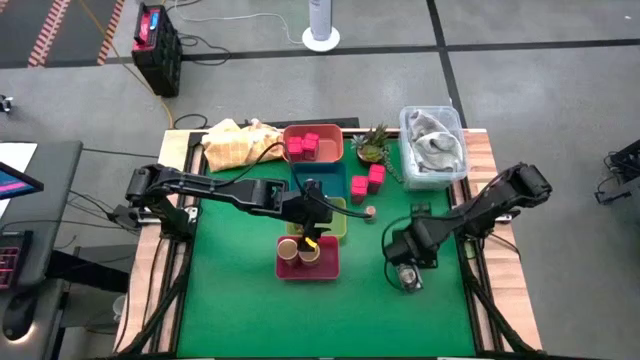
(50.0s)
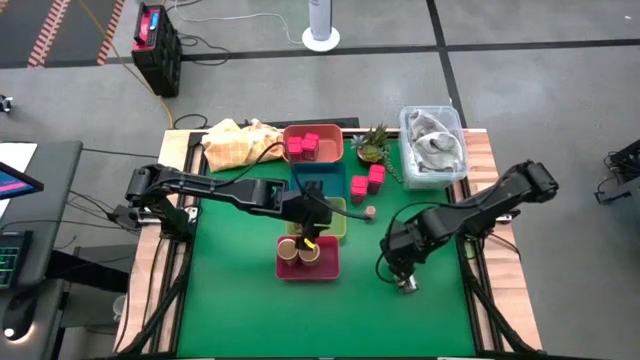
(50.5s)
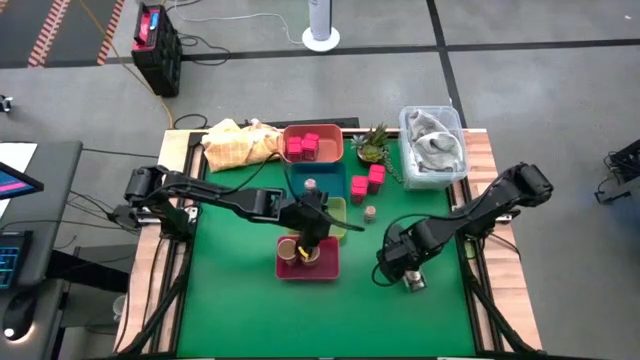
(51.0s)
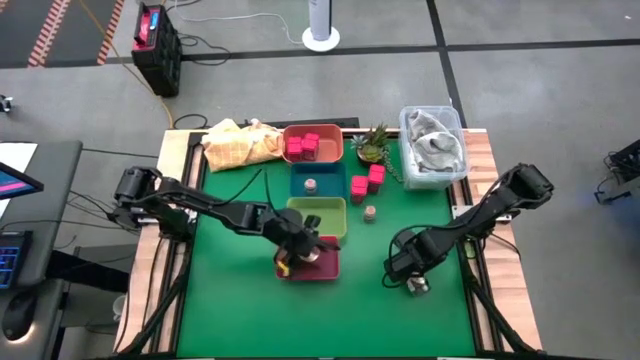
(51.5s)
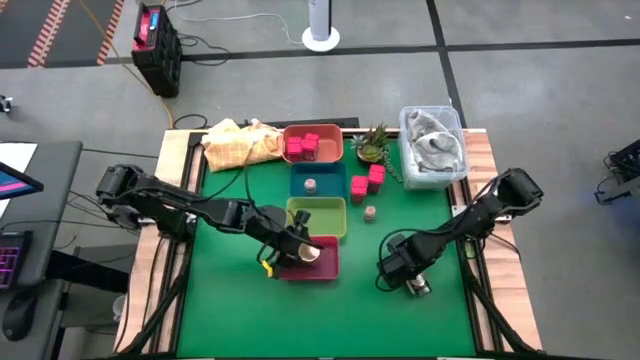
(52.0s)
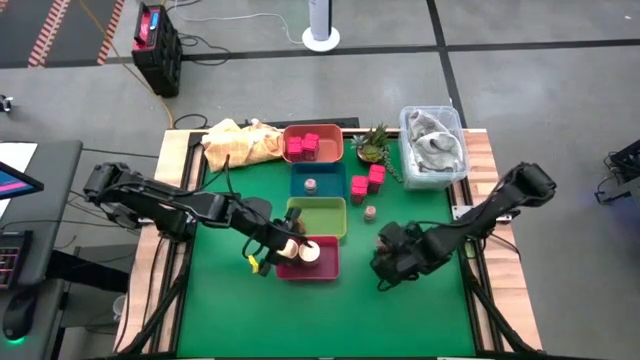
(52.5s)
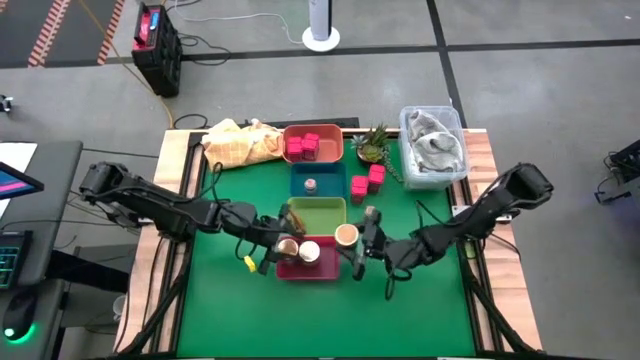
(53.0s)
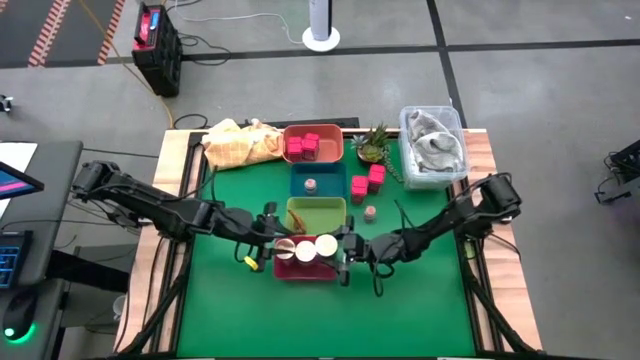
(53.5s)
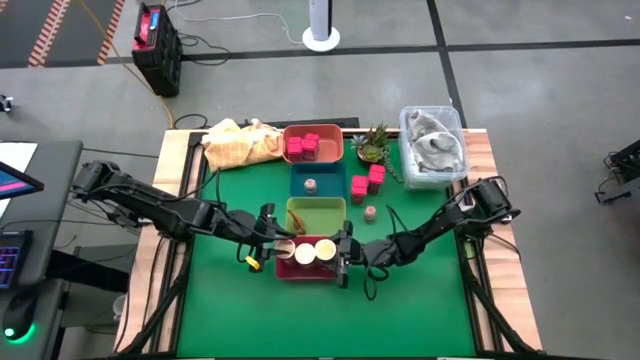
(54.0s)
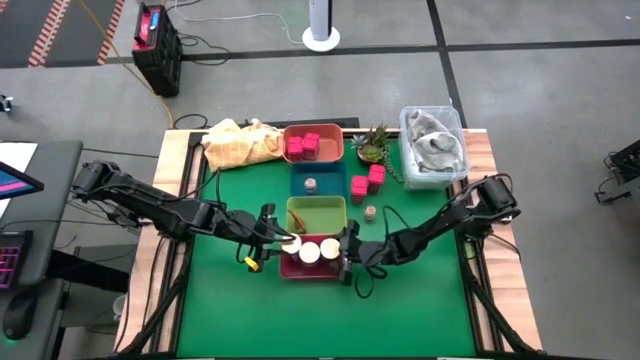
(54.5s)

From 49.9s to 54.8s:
Task: Sort spices by type
Put the gold seasoning bottle into the red bin

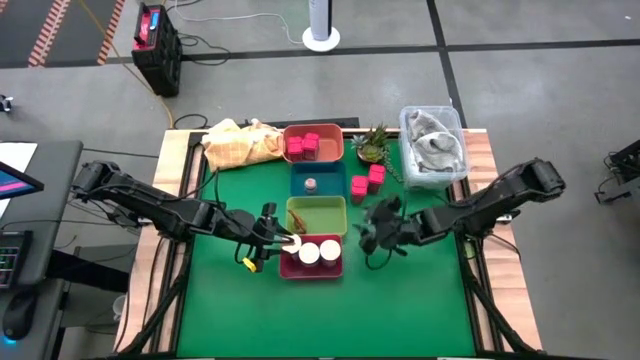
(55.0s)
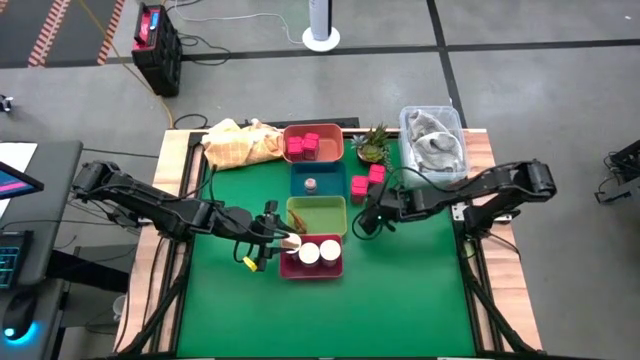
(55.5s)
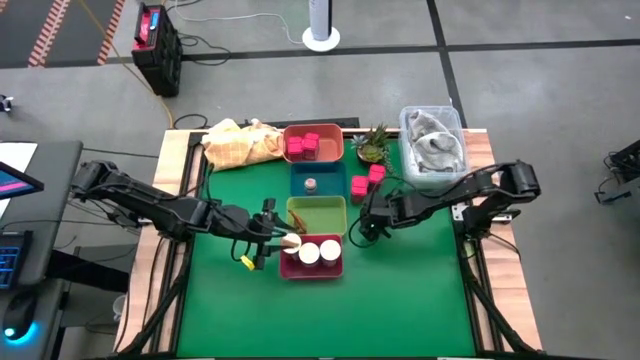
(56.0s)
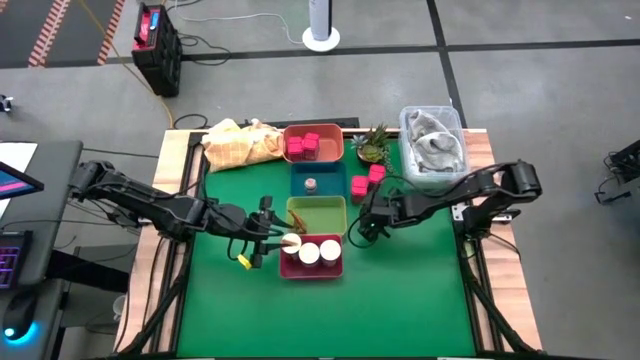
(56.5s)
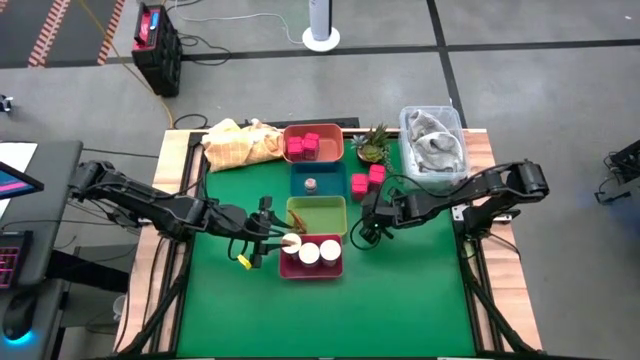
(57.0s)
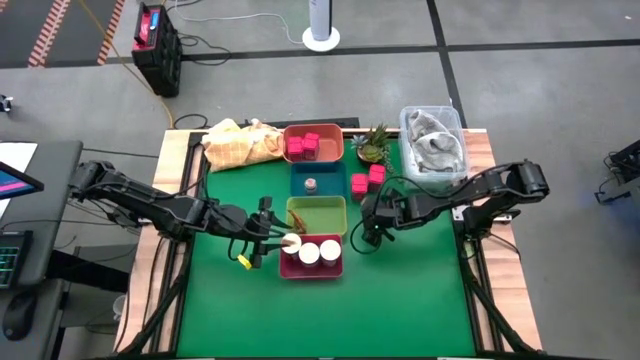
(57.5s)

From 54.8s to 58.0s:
Put the brown seasoning bottle into the blue bin

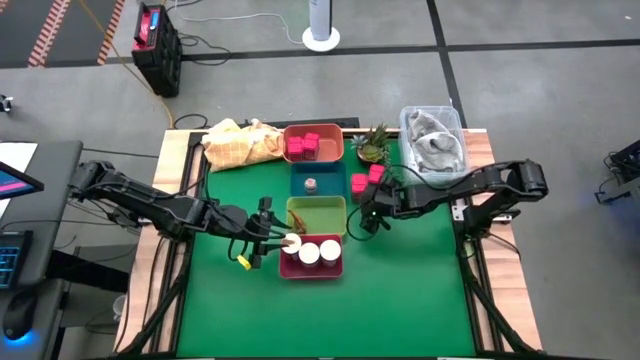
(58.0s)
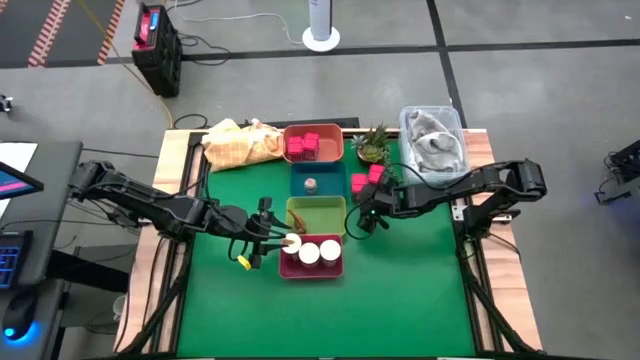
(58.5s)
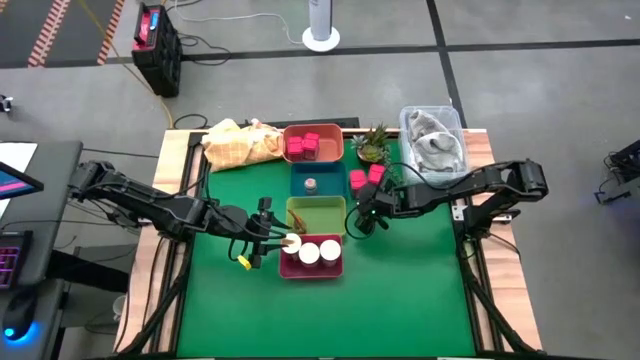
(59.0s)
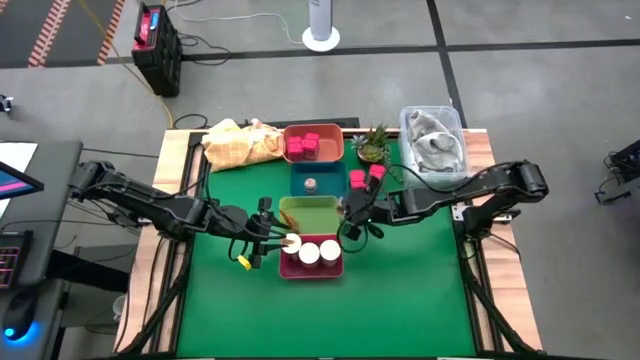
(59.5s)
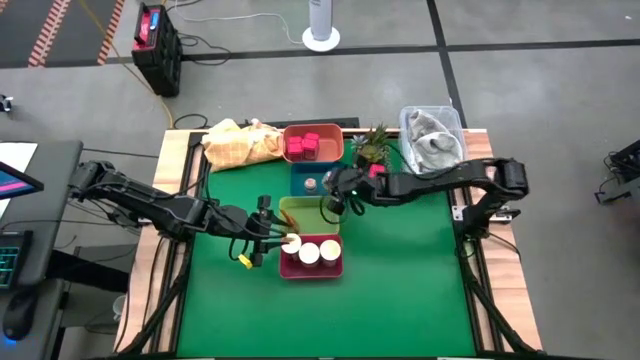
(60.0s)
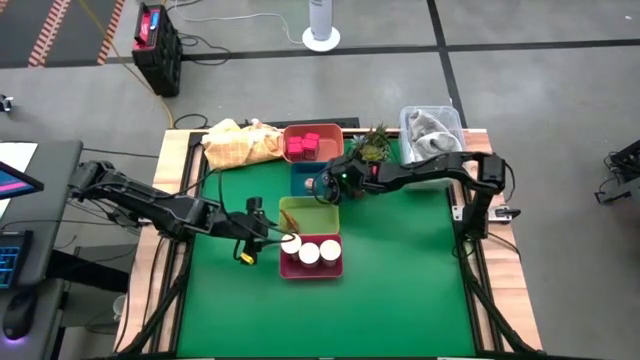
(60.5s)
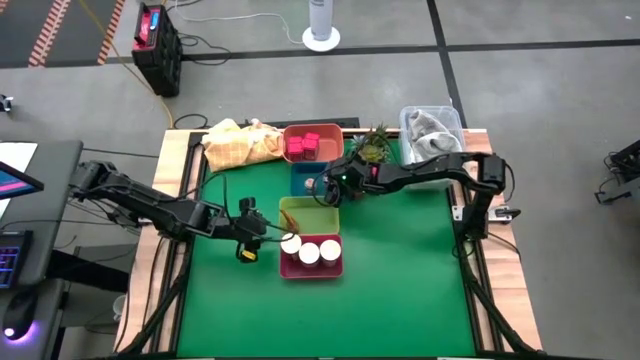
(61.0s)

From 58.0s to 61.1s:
Put the brown seasoning bottle into the blue bin

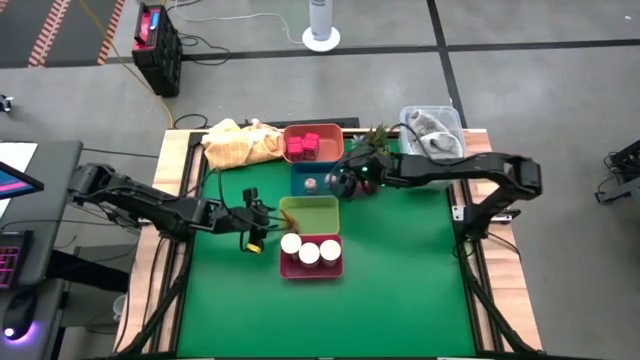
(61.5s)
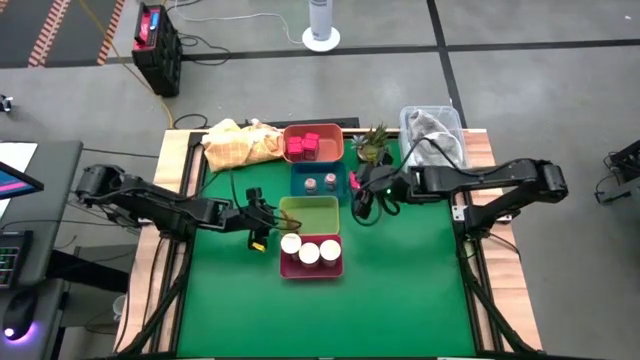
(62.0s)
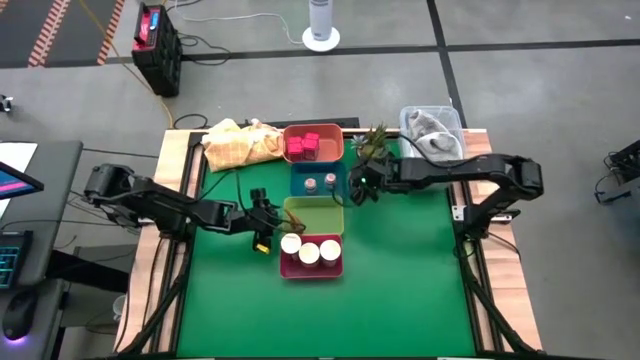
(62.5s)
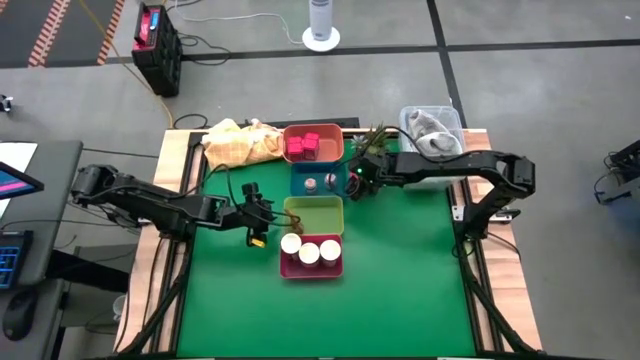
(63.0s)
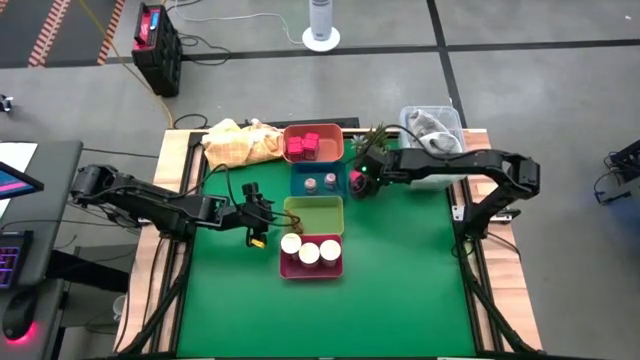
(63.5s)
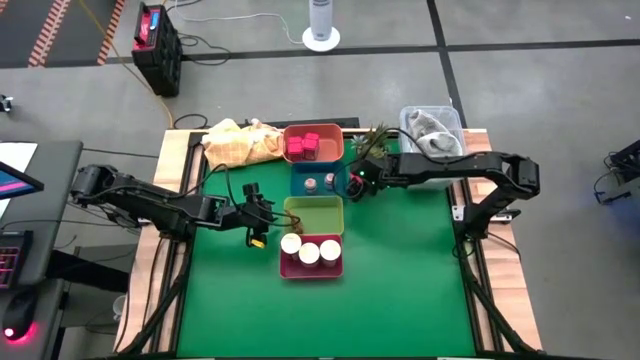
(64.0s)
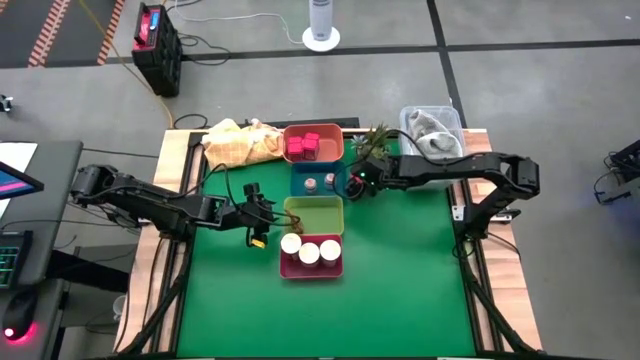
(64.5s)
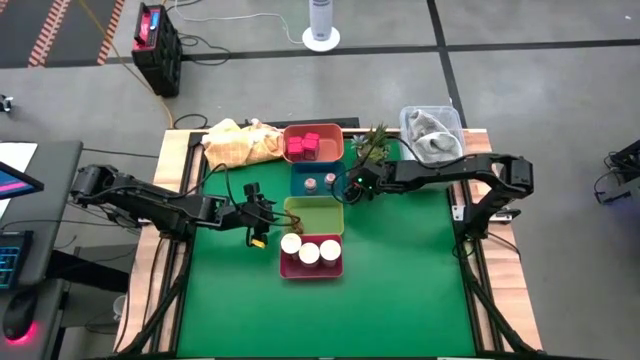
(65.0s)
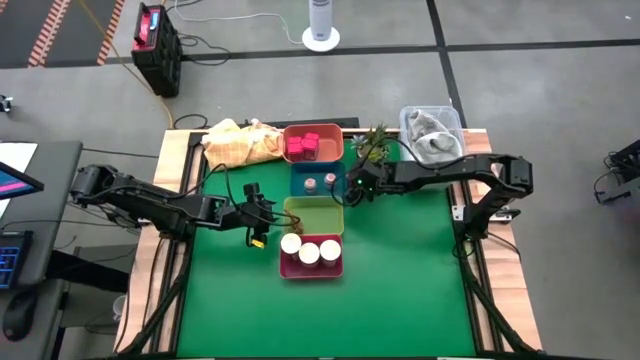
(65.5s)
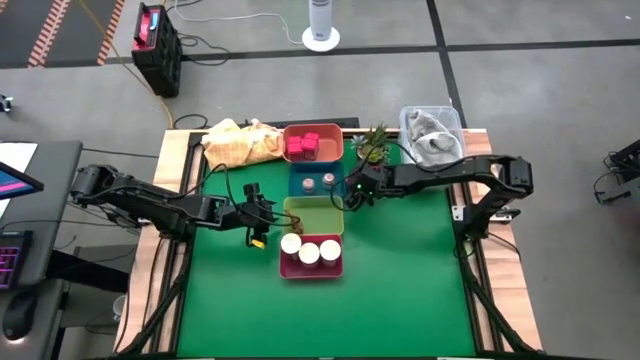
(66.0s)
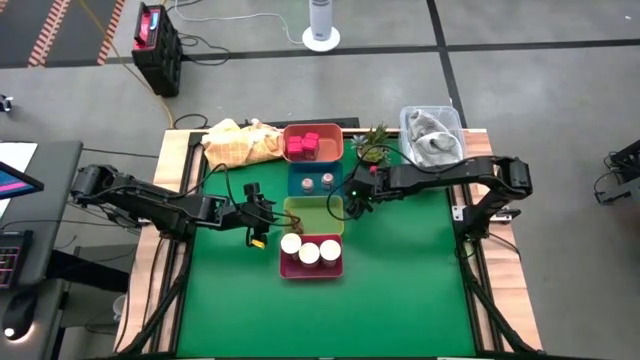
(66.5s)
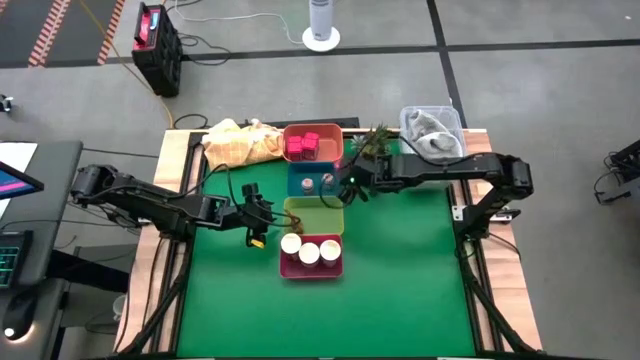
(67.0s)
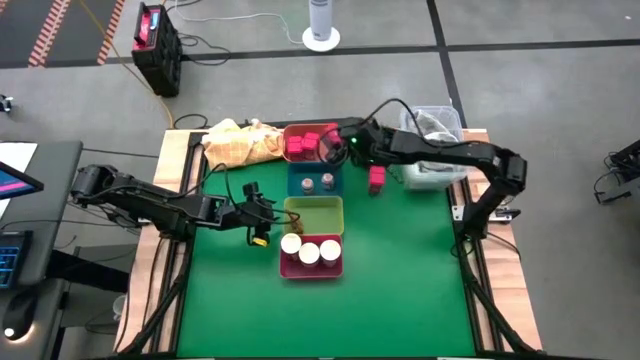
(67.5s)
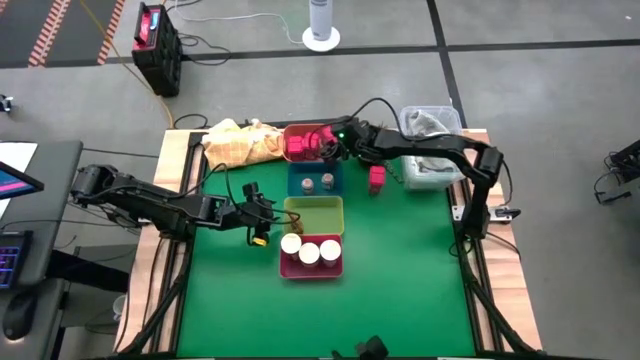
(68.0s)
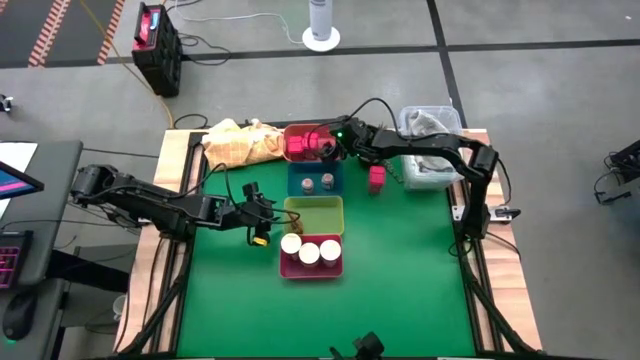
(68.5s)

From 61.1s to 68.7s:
Put the red seasoning can into the orange bin

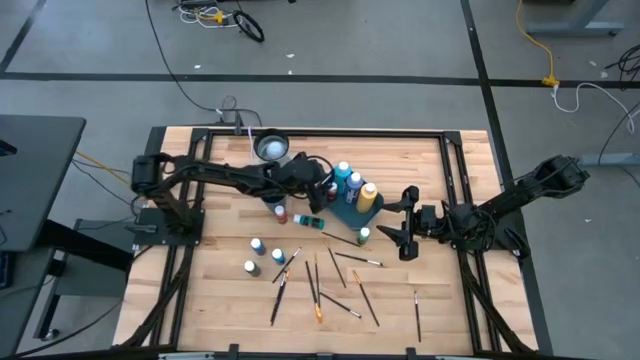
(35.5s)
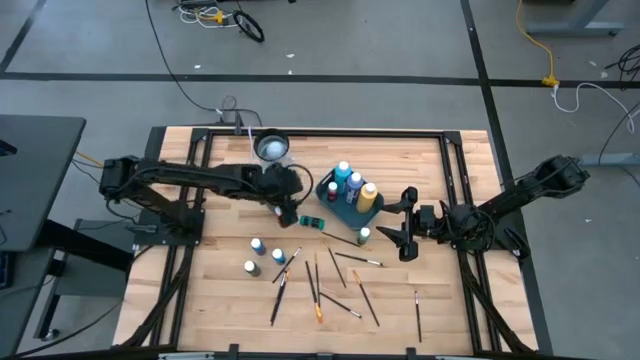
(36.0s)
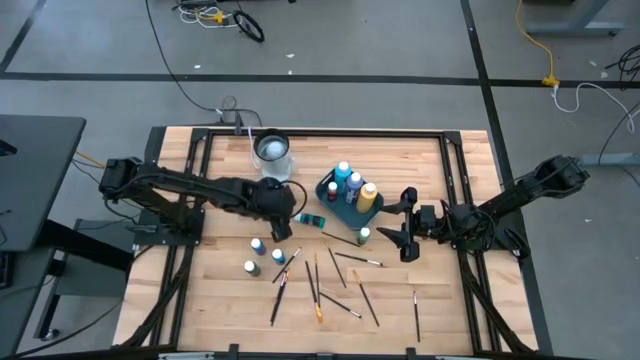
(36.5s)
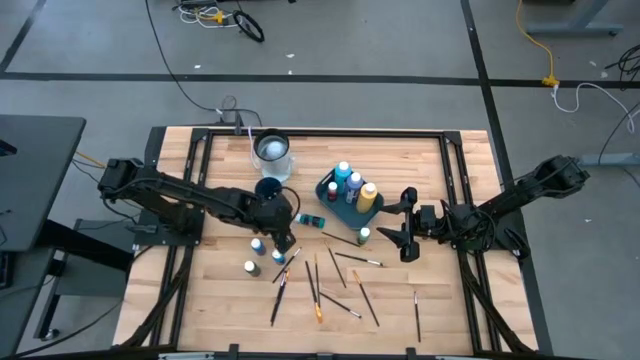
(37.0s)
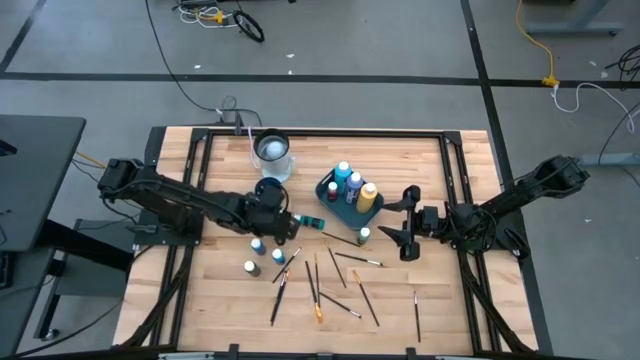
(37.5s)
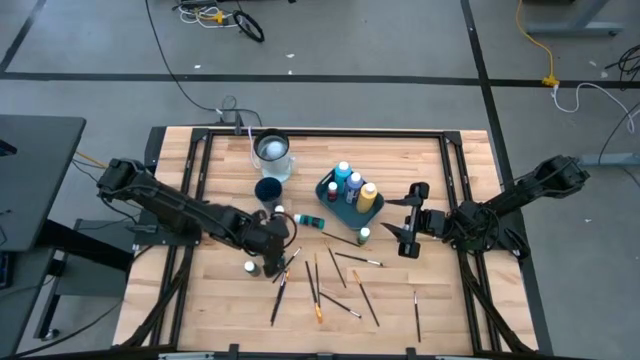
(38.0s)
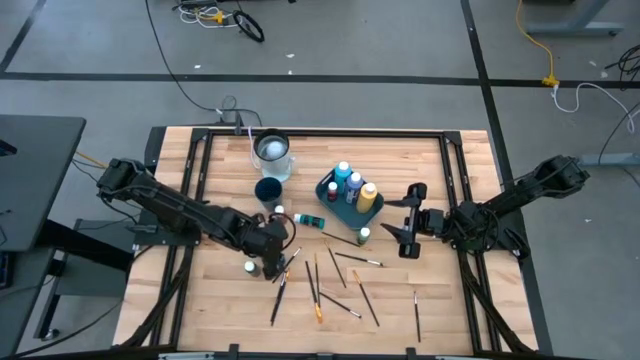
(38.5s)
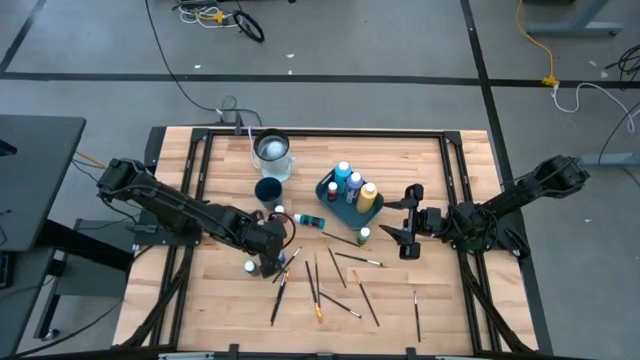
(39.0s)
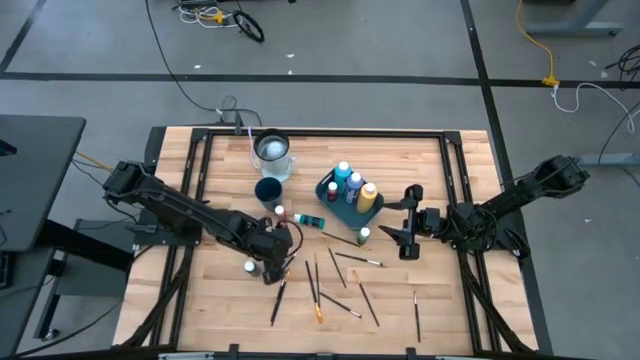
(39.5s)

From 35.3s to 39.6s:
Task: Pick & Place Paint Supplies
Put the blue paint bottle into the blue bin
